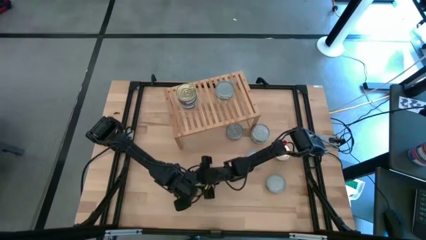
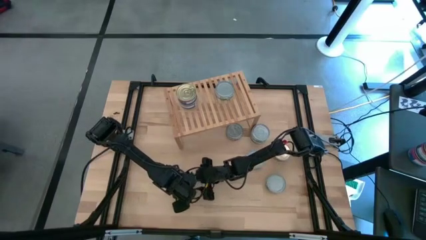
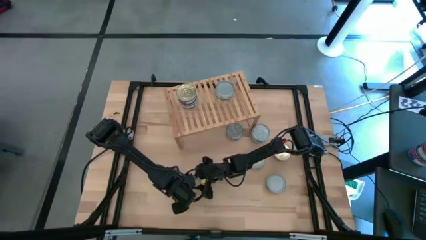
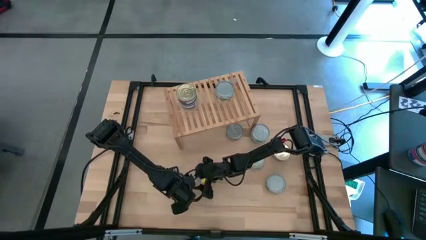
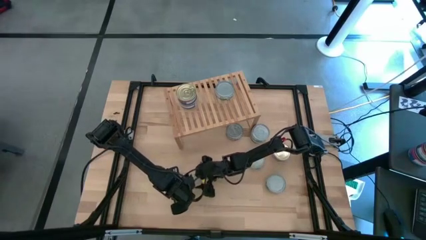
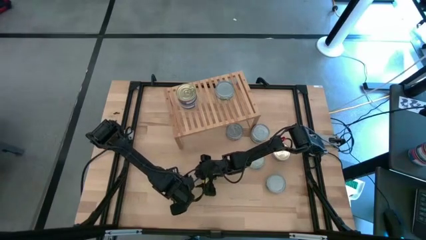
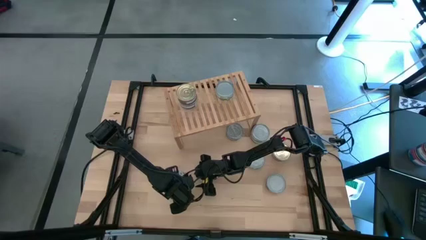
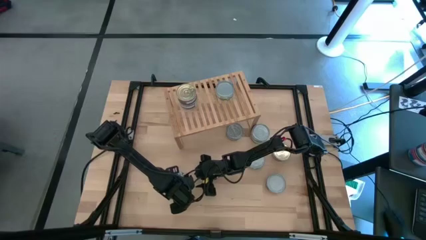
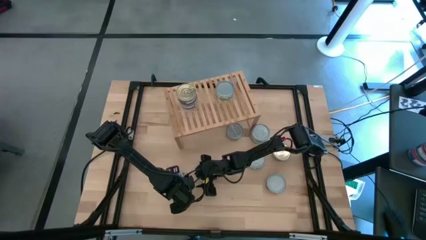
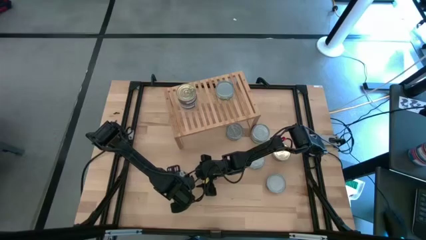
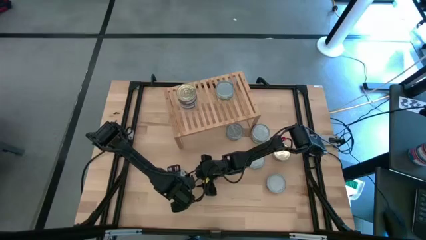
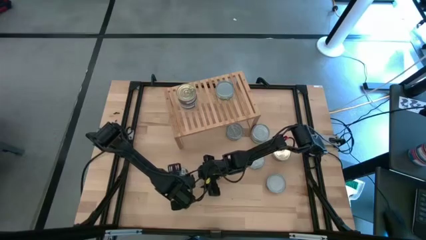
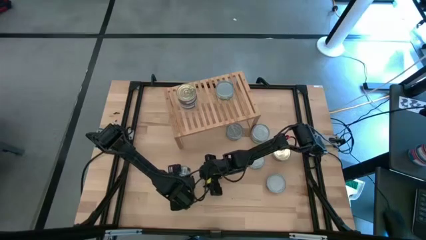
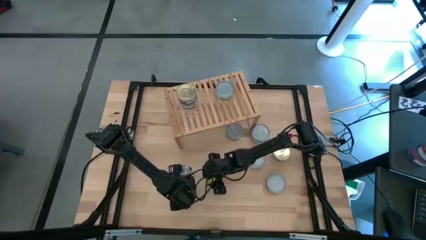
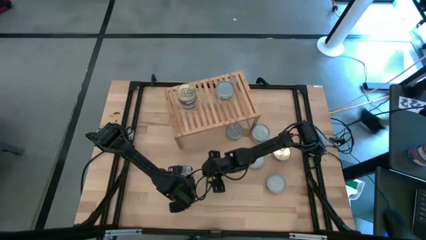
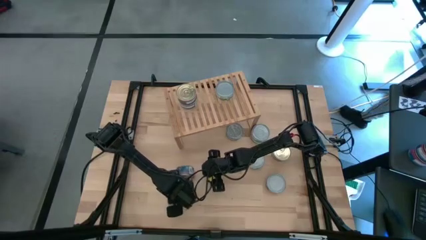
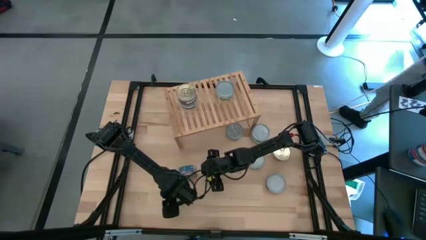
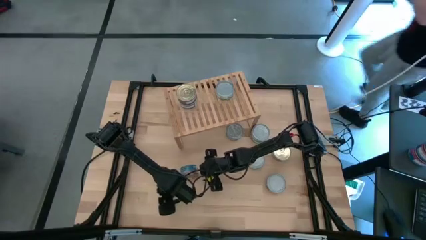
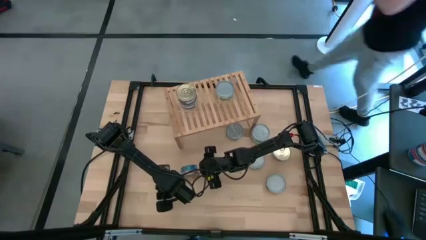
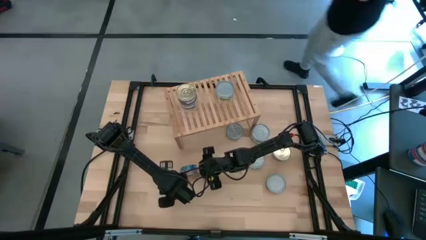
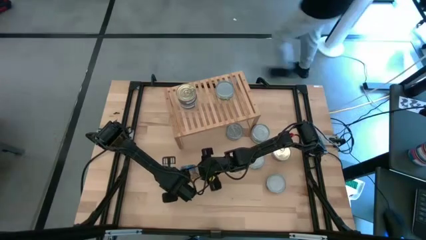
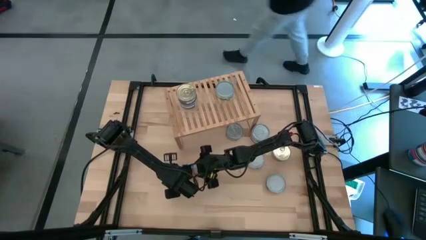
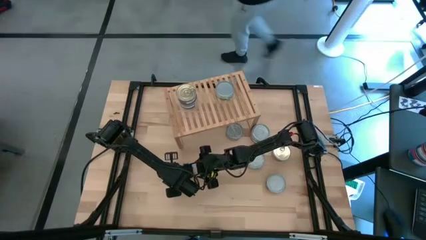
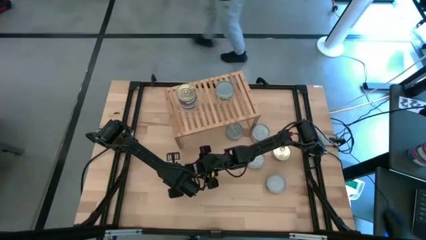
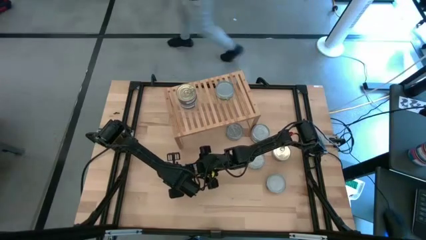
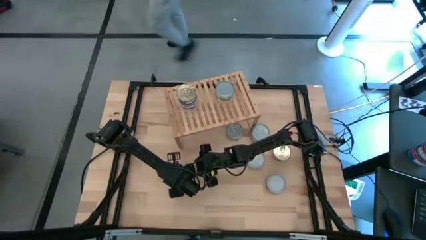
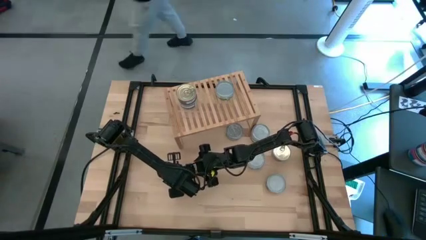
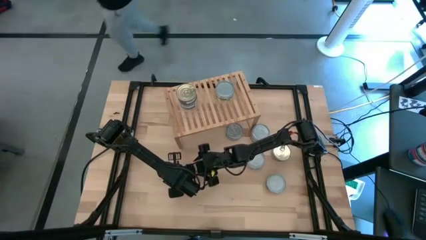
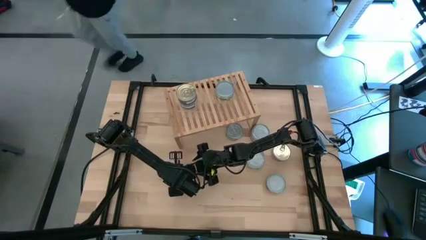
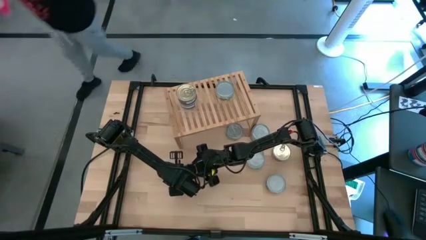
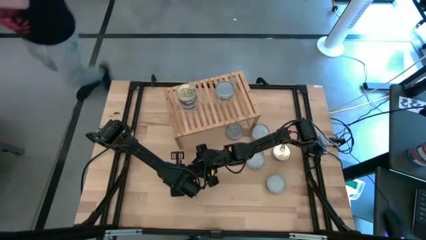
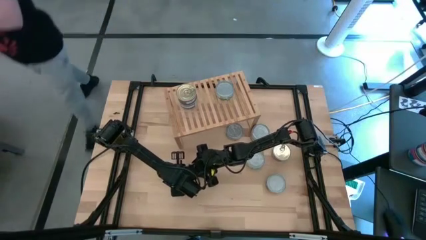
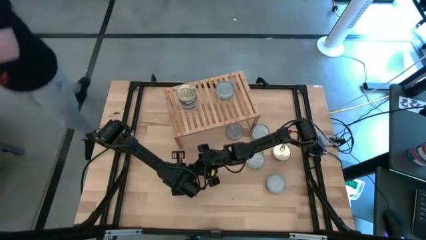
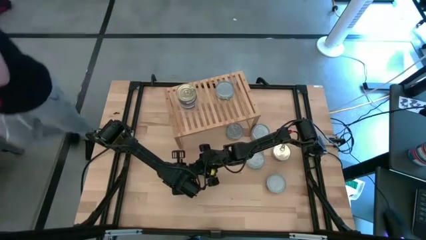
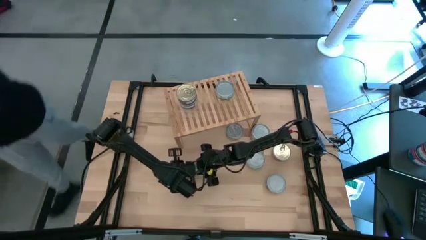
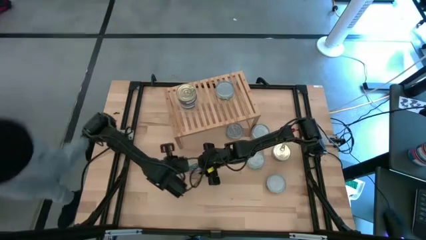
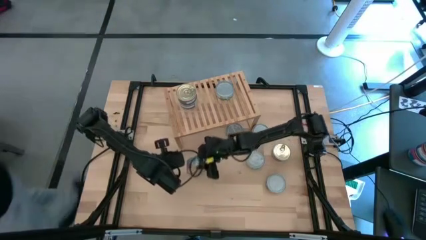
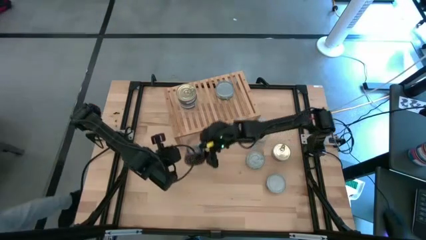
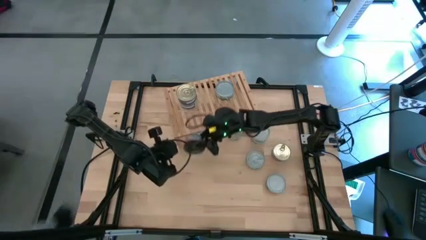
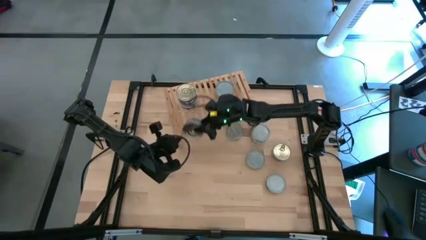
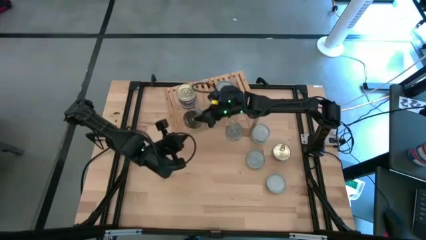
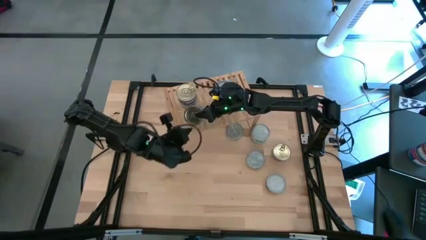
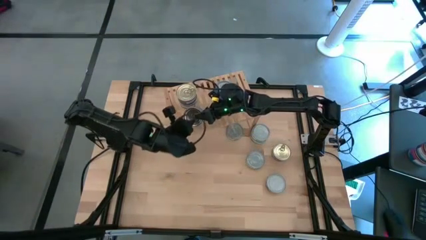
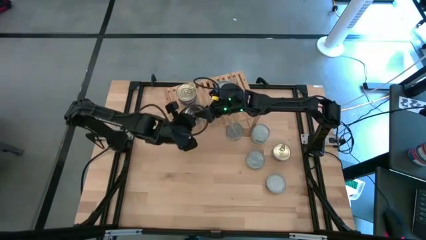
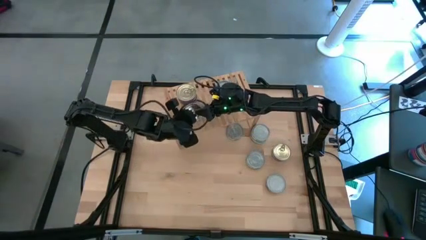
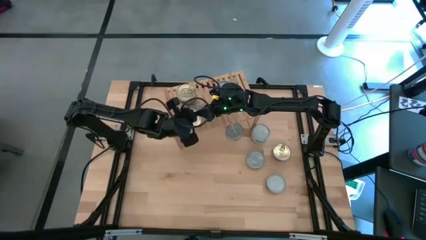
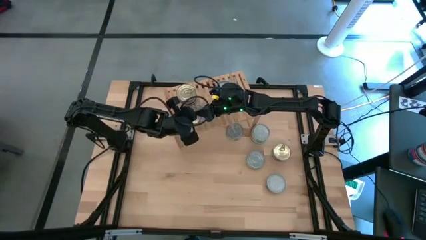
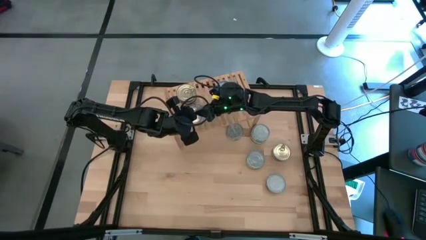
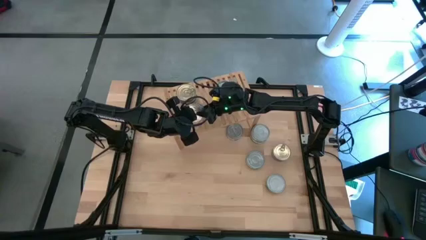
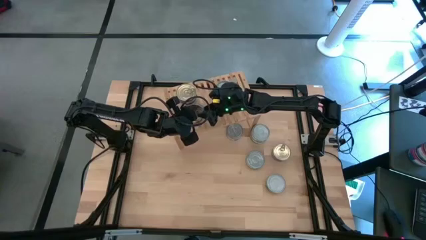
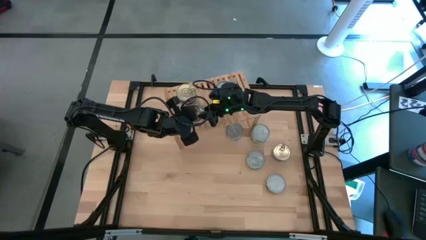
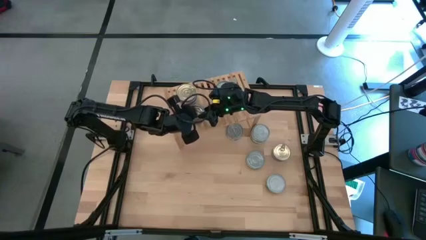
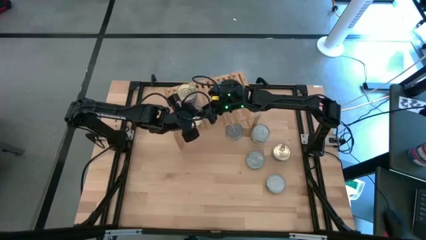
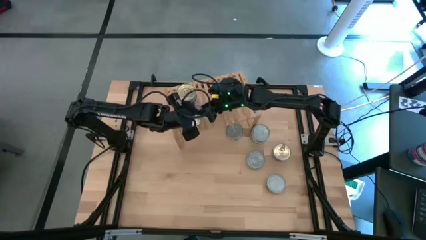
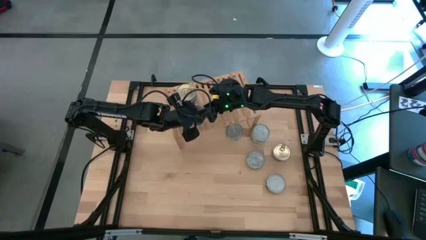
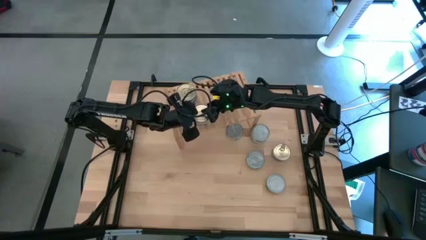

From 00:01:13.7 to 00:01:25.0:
Task: Stack canned seafood by type on shelf
Put the blue tuna can on the shelf aligned with the other blue tuna can
